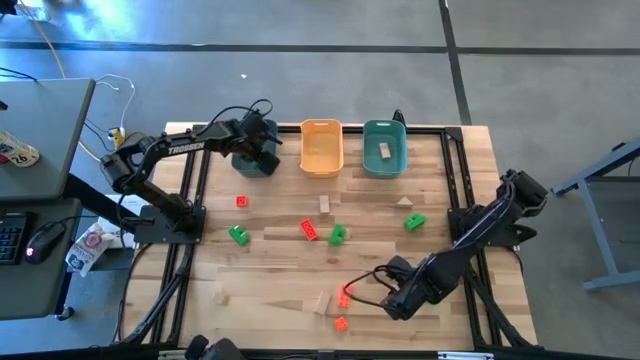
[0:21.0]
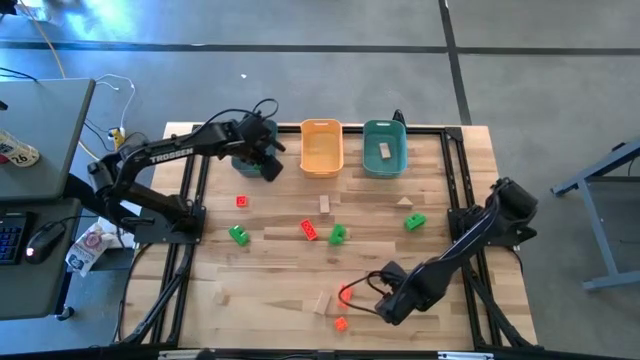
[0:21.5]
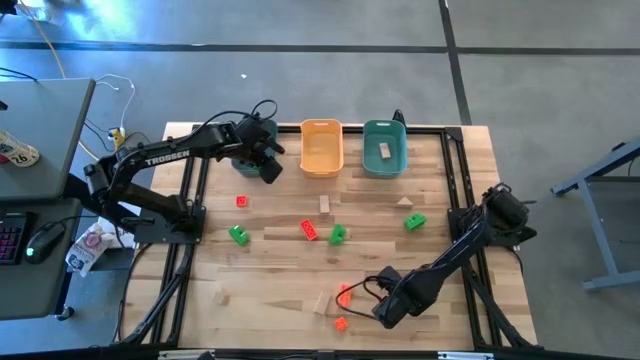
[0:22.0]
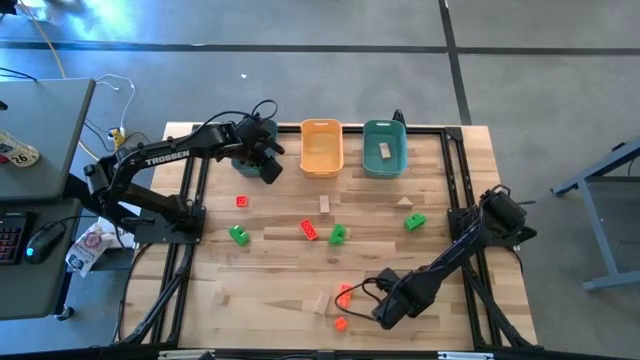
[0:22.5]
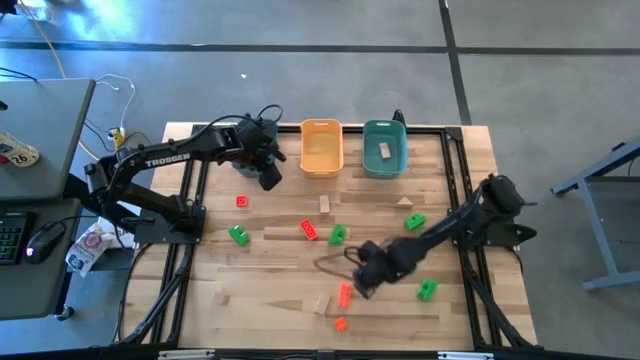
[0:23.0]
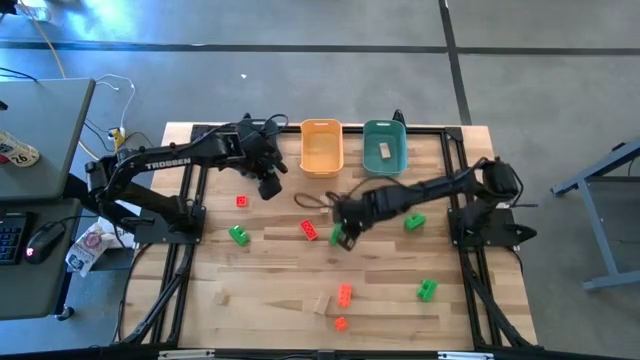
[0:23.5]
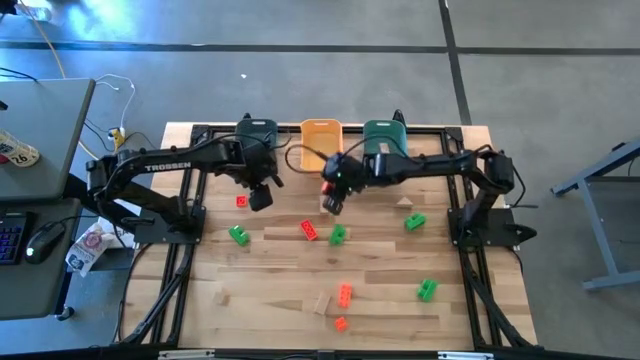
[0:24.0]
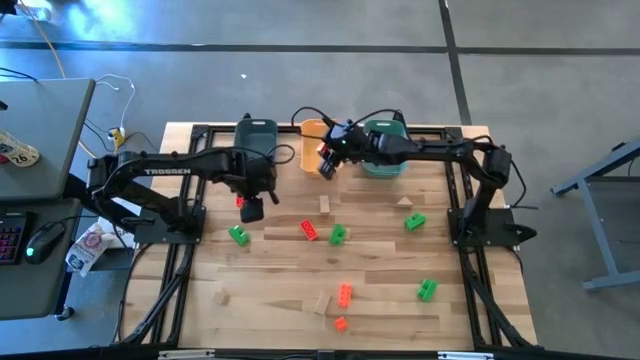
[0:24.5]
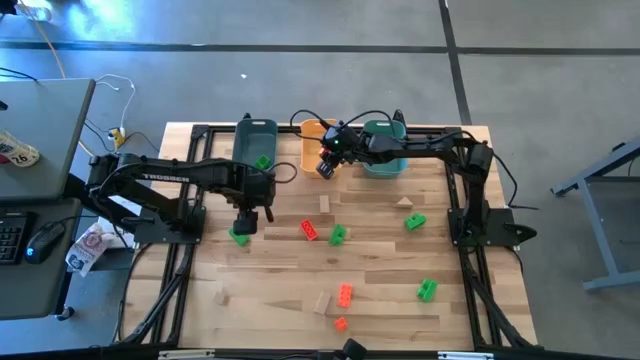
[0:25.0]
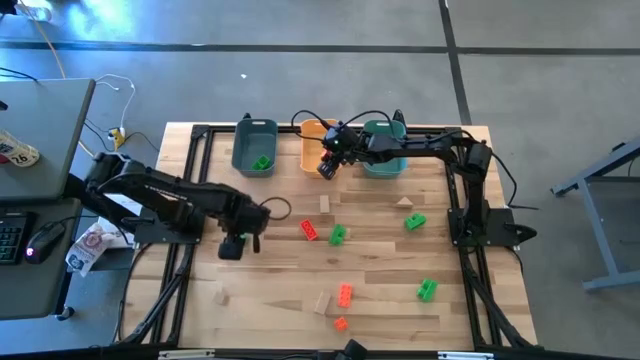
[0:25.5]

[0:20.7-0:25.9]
Task: Sort & place blocks by color
Put the orange game piece into the yellow bin

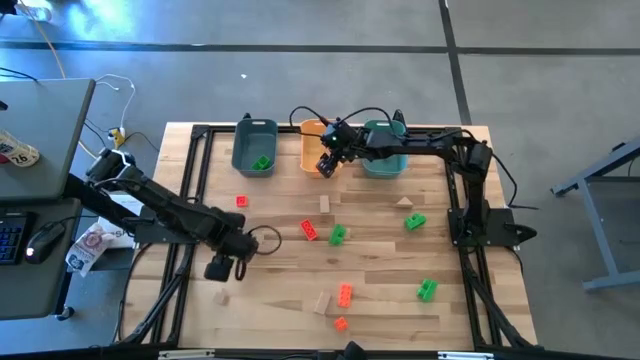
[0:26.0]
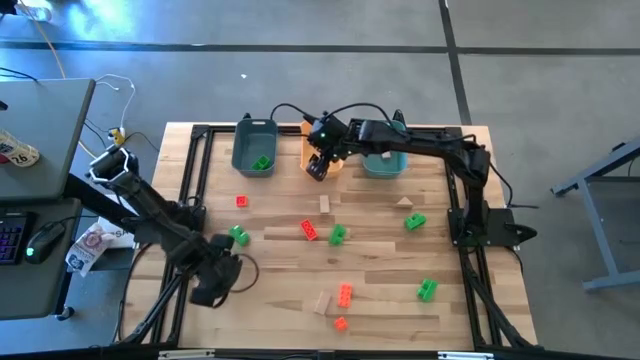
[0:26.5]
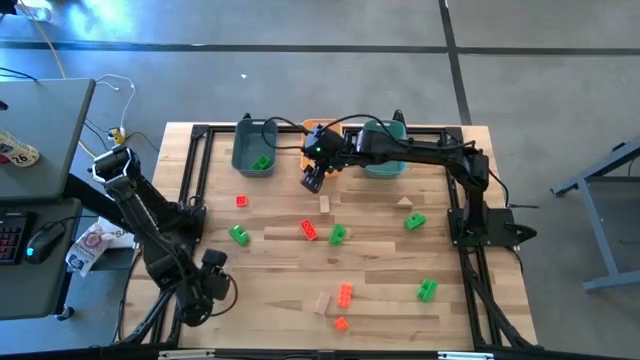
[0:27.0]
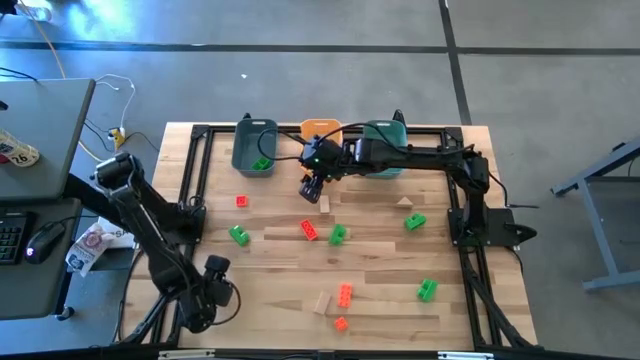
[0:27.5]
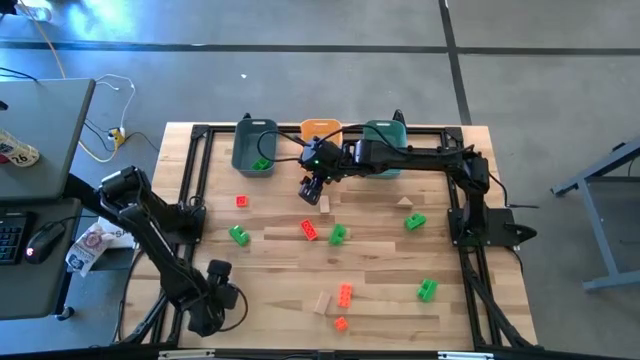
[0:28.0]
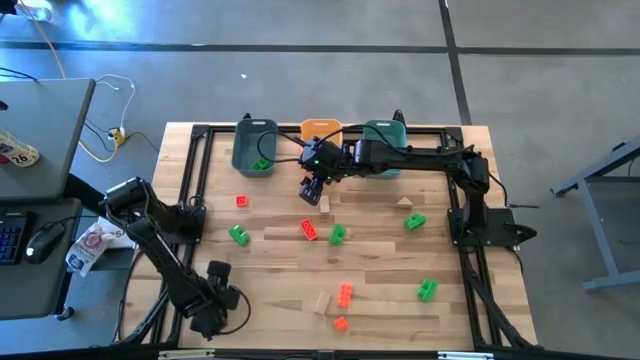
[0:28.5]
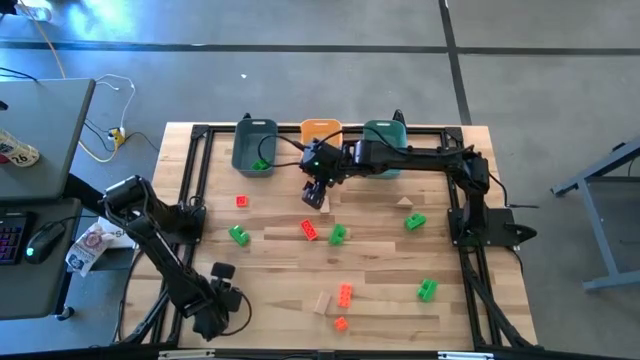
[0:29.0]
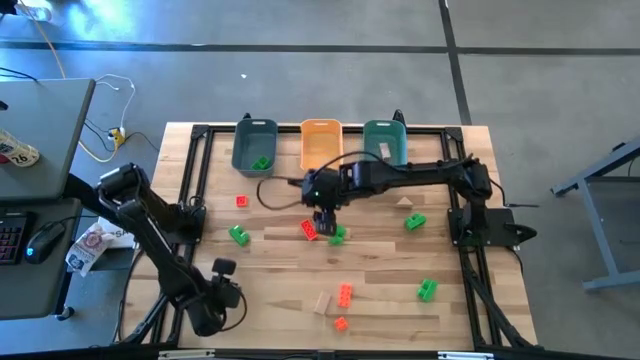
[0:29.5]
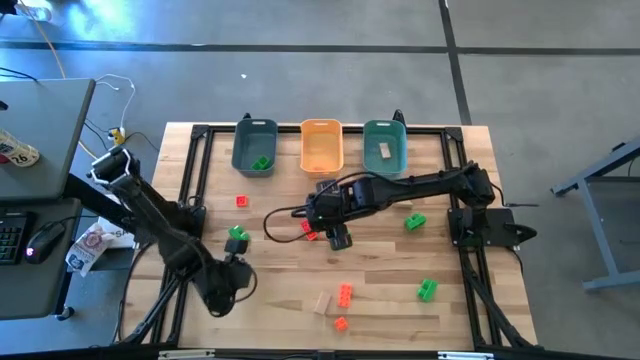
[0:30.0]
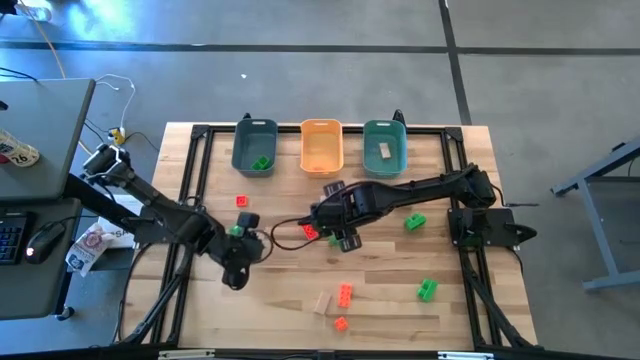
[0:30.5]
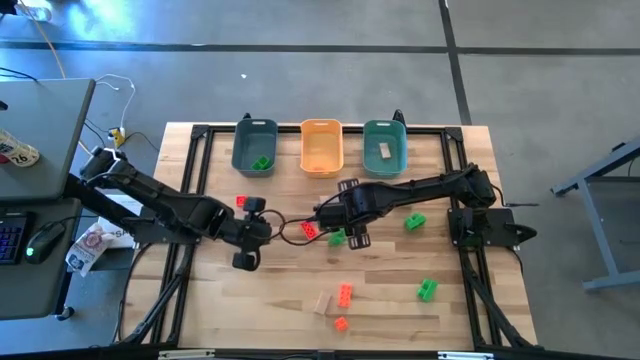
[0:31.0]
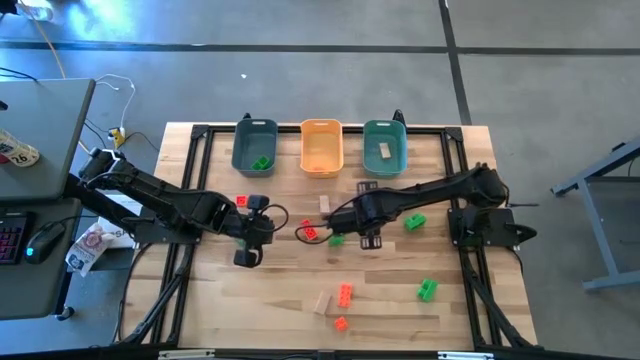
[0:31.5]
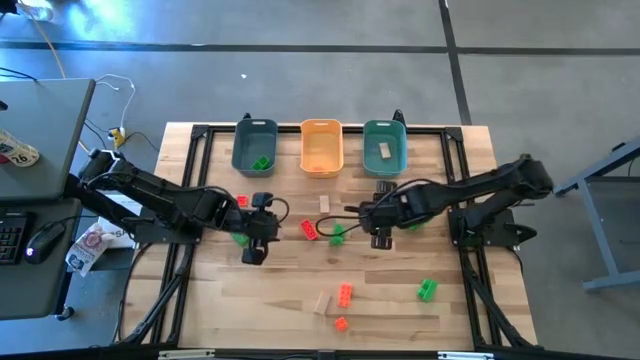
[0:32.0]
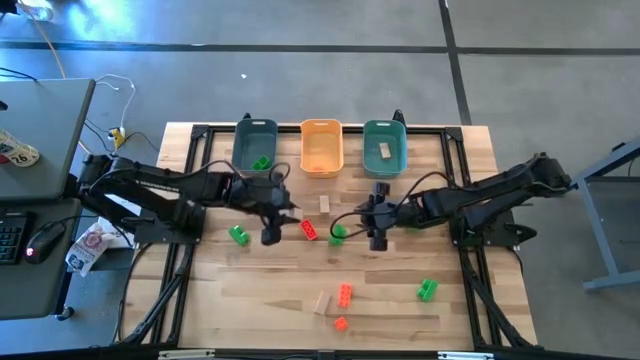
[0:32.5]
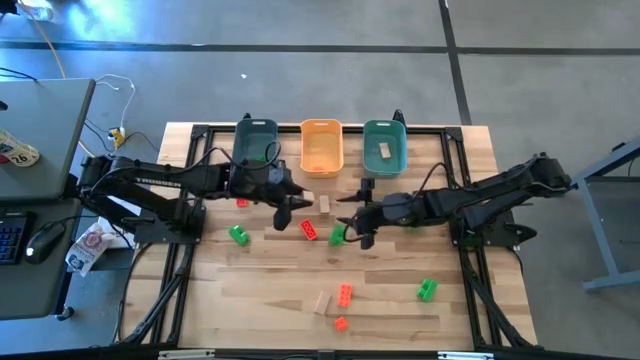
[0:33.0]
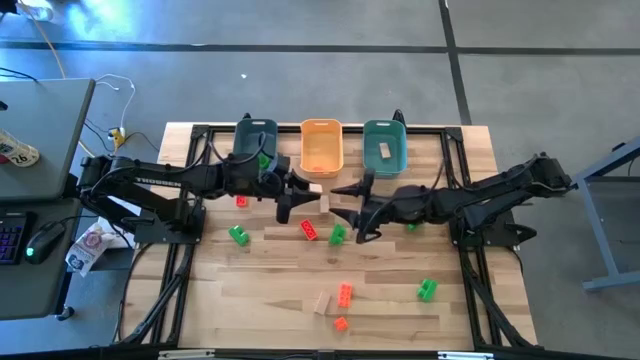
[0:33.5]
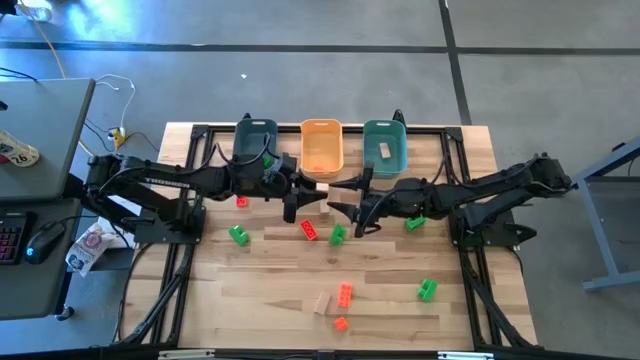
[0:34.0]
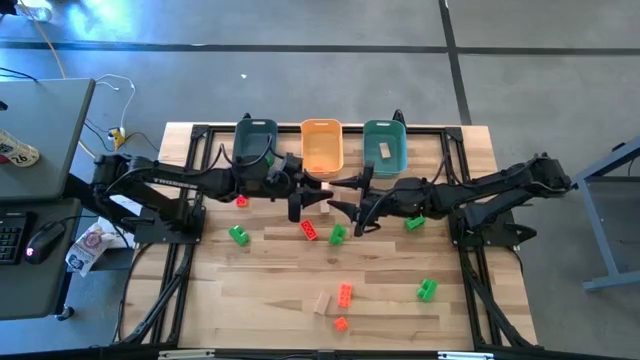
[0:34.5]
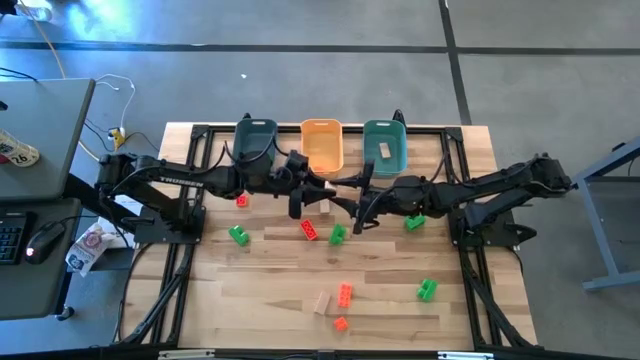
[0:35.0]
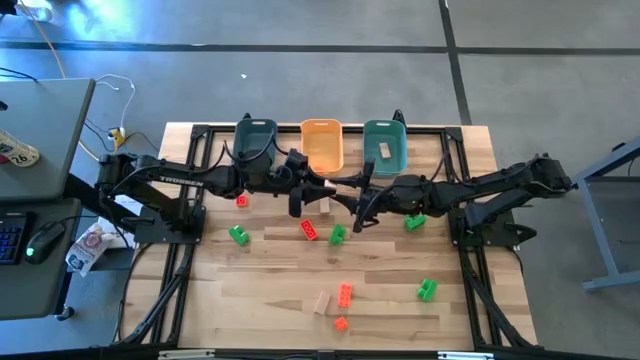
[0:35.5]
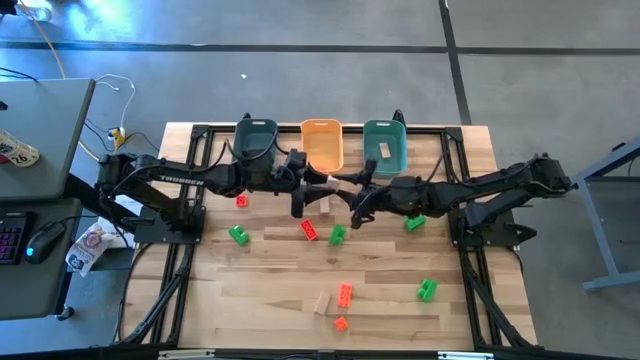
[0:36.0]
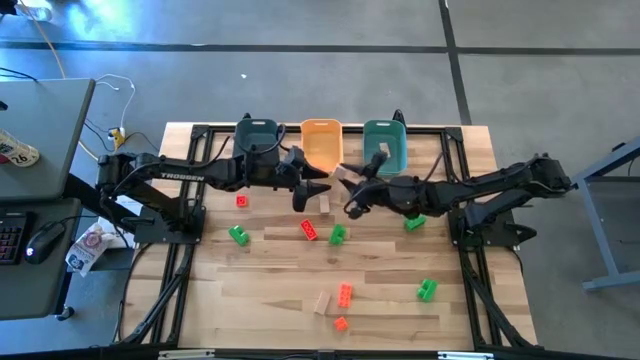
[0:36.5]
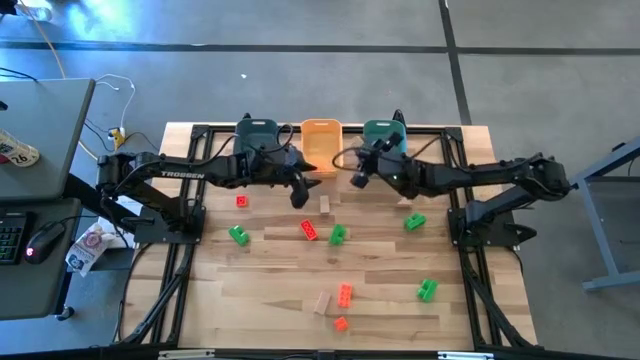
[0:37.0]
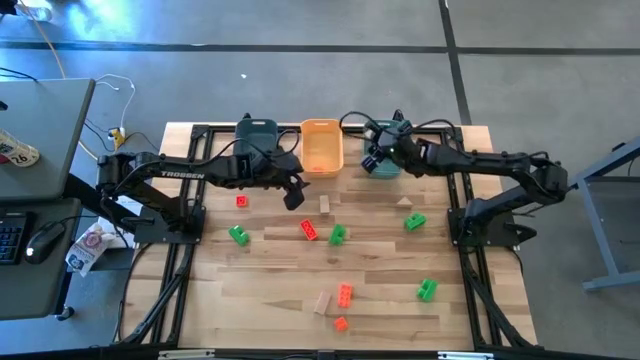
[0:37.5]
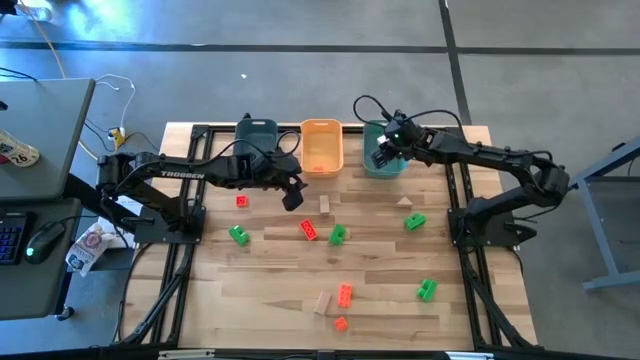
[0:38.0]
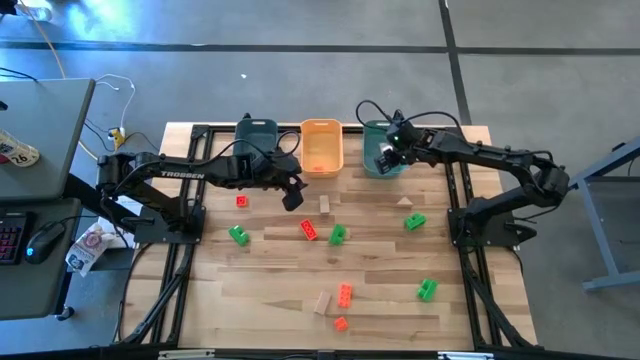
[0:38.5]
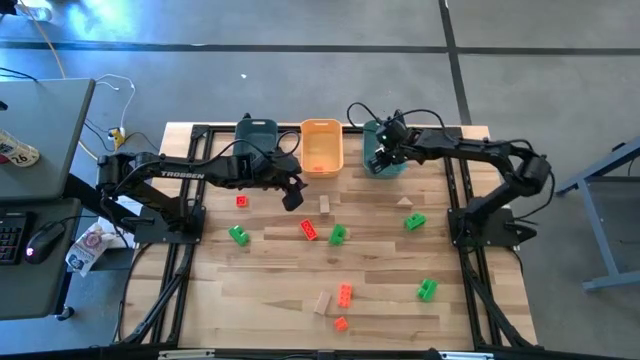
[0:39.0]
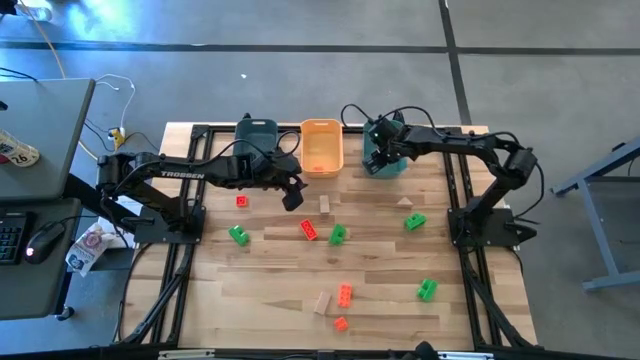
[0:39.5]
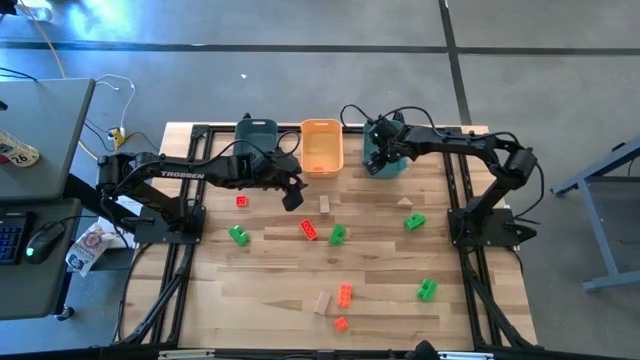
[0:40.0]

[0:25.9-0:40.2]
Put the brown block into the green bin
